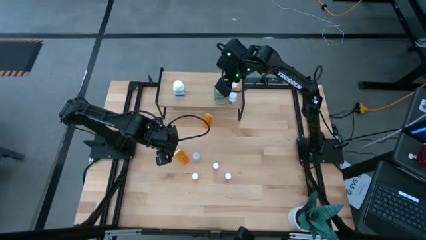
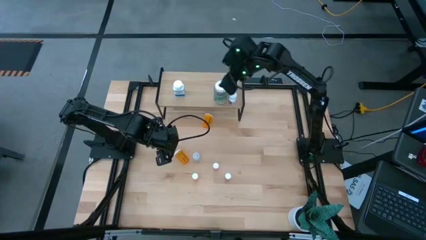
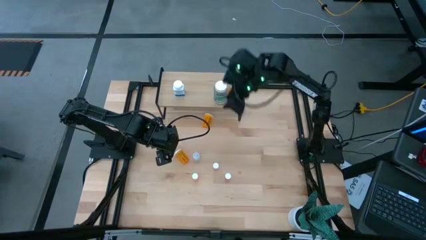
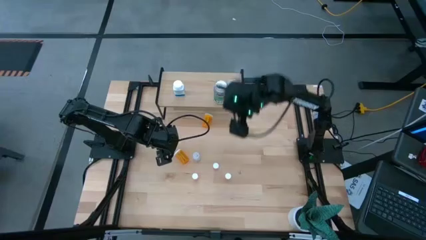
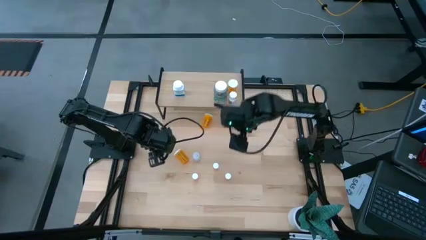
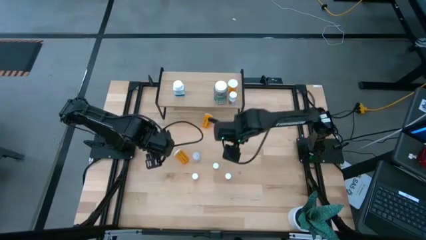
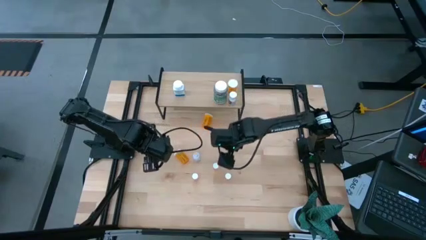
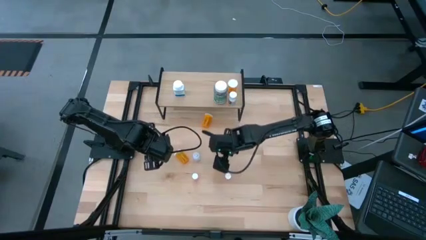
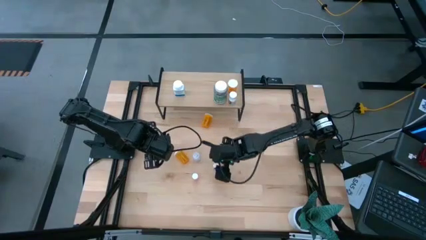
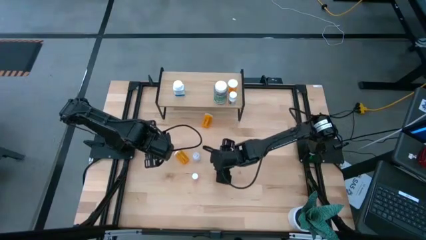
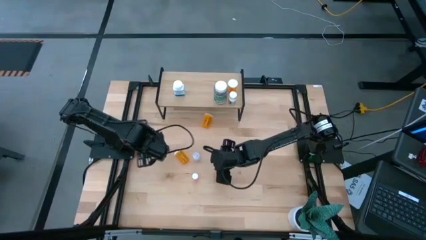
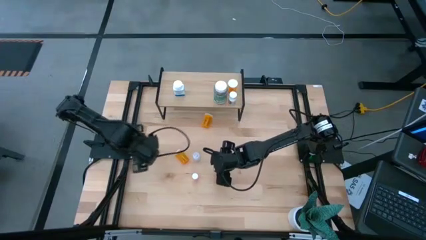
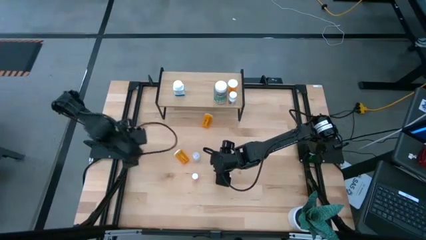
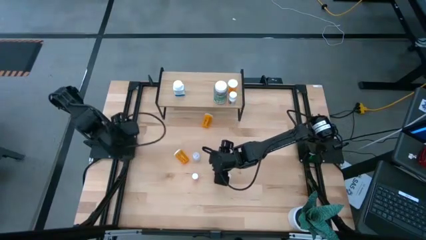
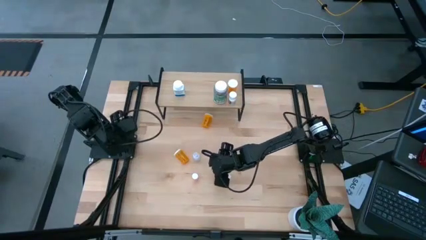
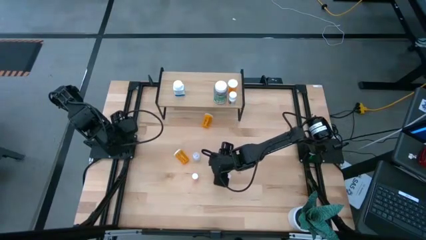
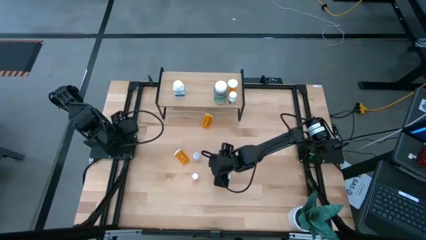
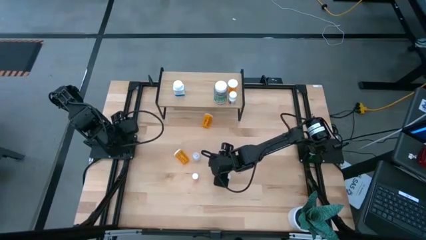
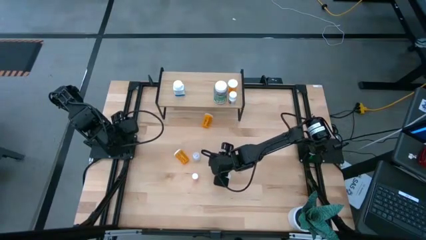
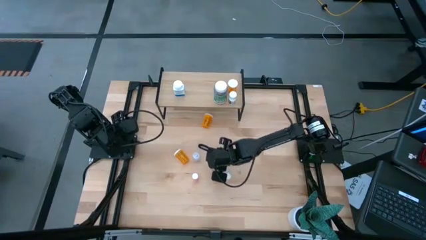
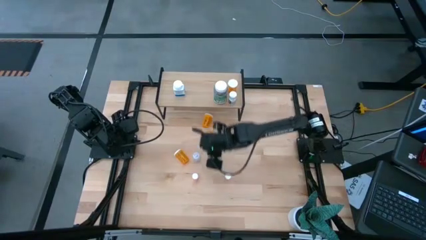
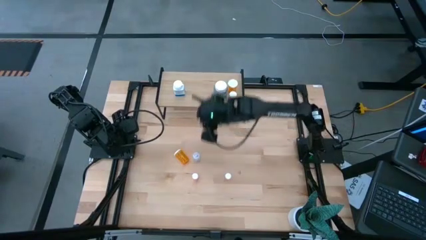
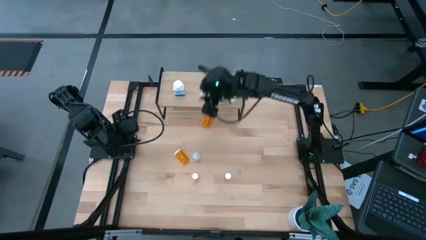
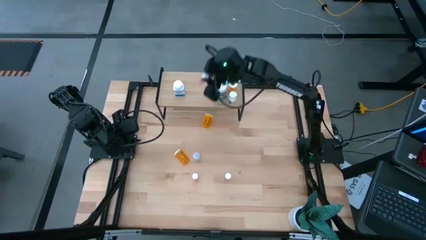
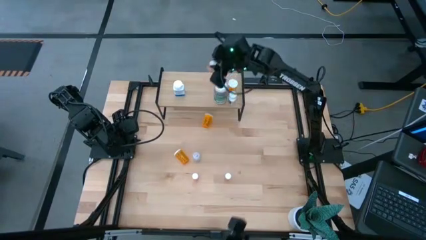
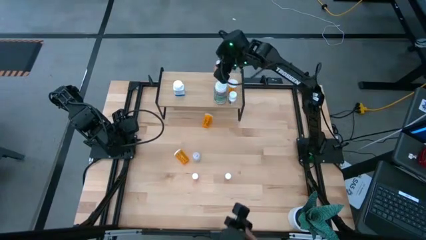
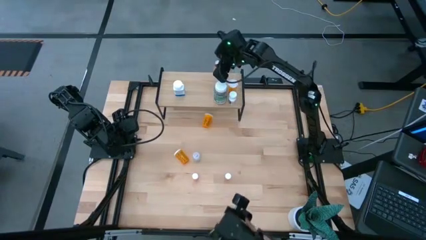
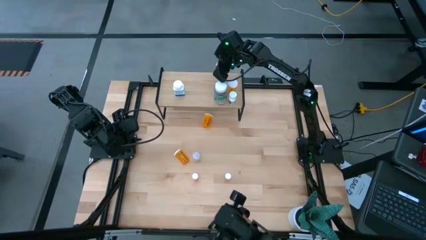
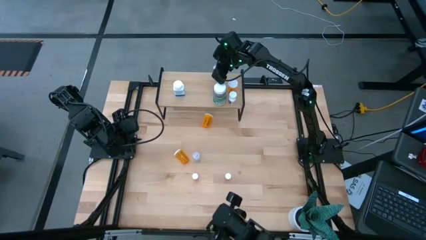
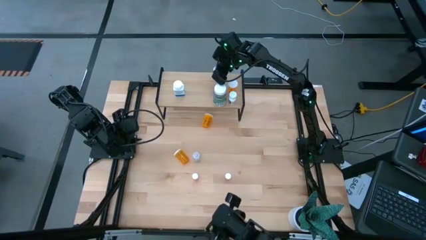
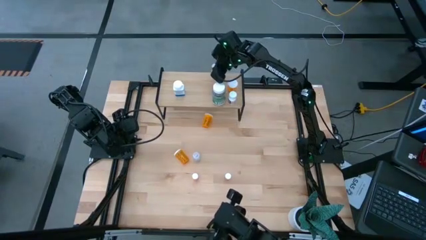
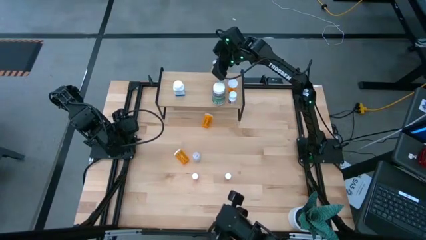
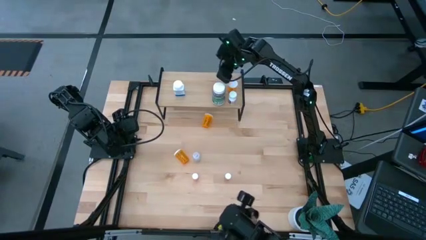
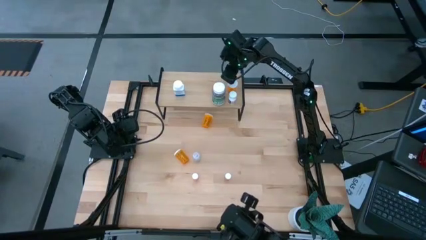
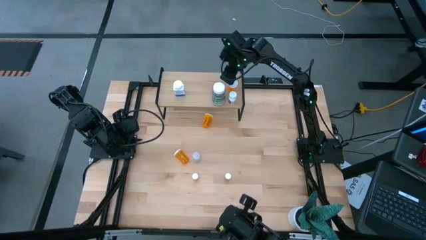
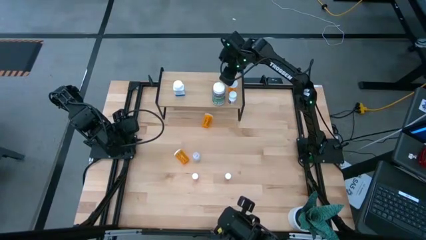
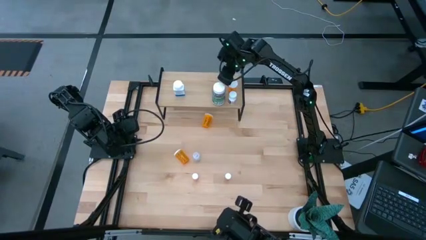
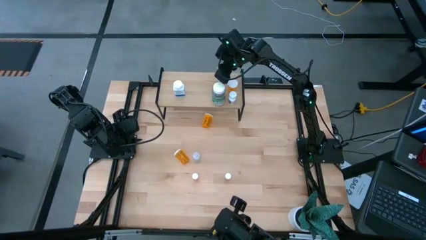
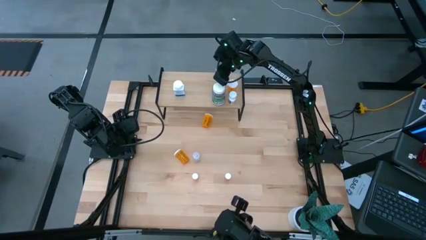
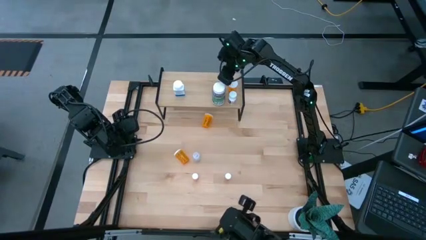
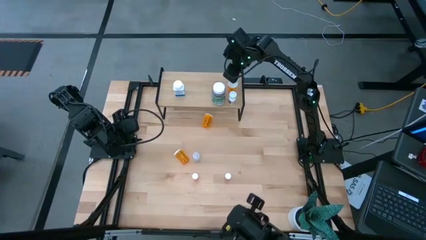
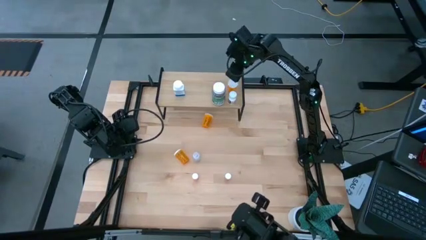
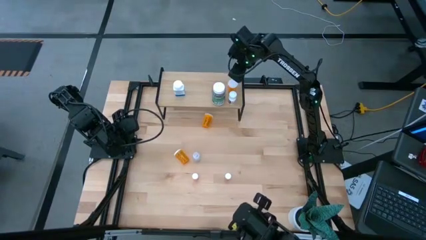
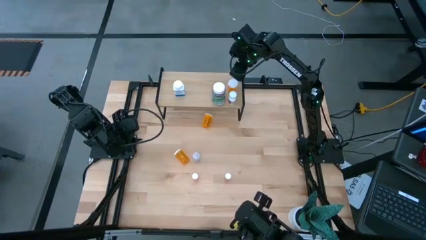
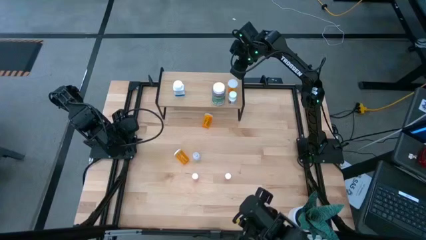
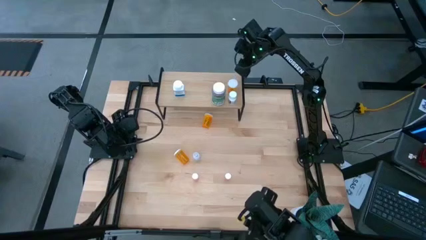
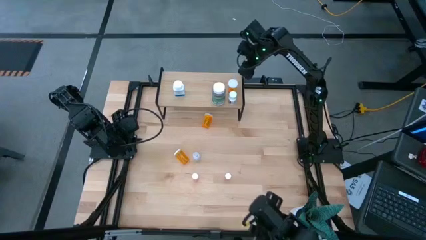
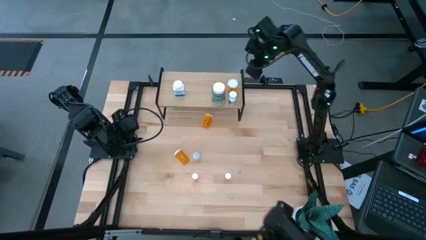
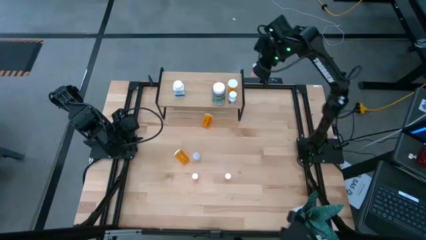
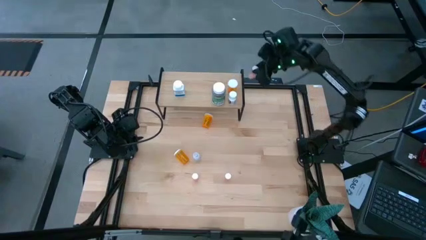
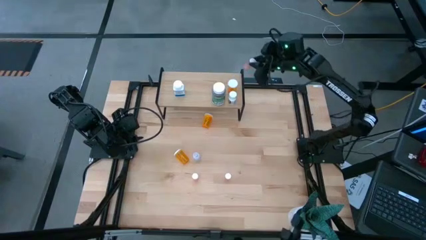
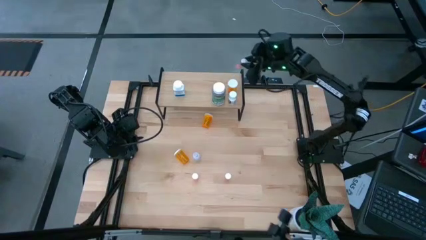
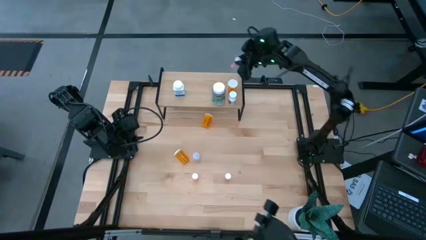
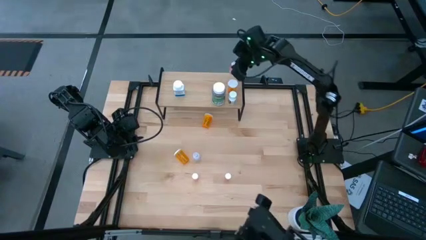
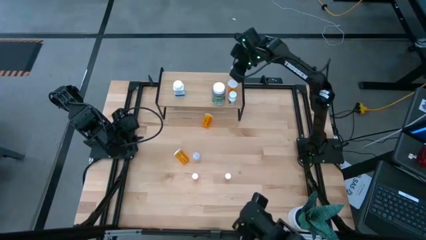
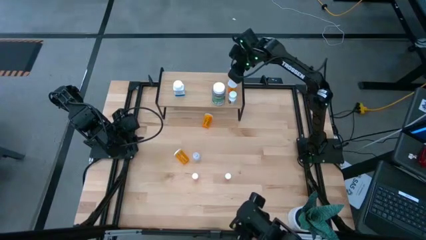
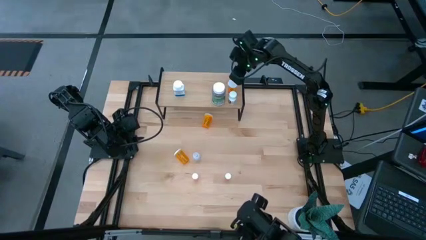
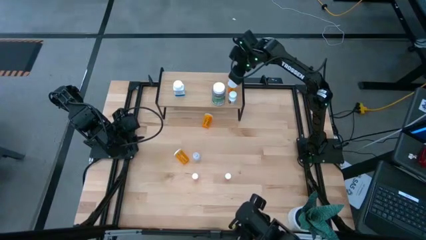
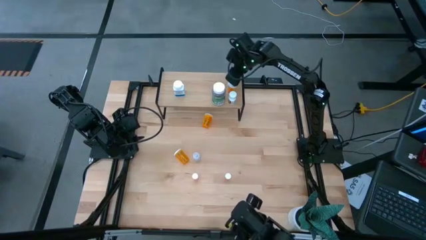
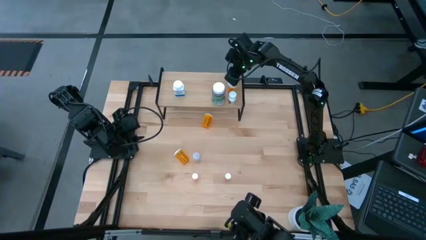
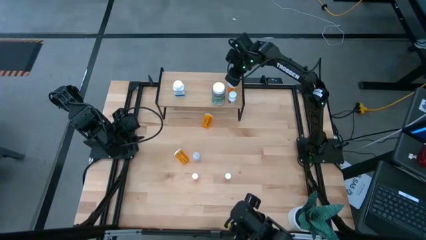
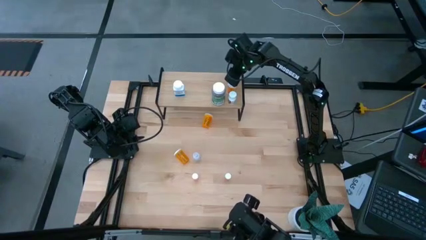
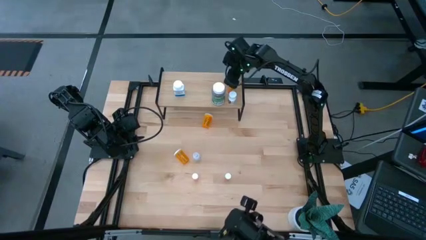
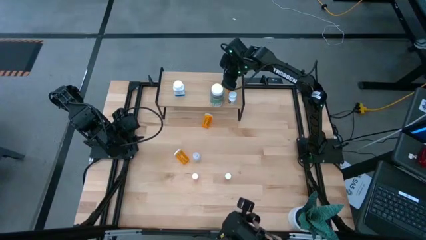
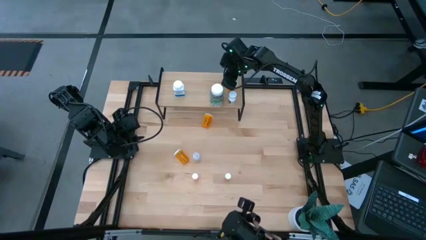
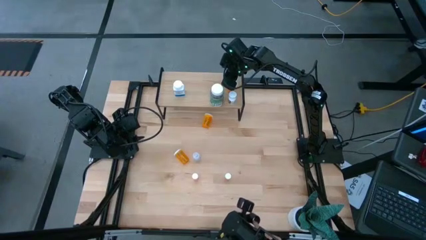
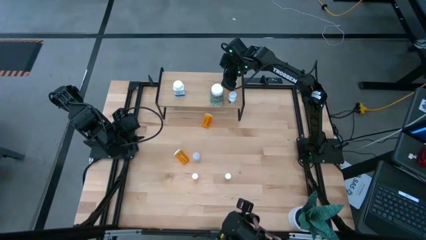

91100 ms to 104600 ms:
Task: Pick and place medicine bottles onto shelf by color
Put the middle pink pill bottle on the shelf

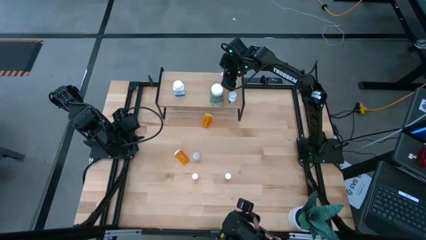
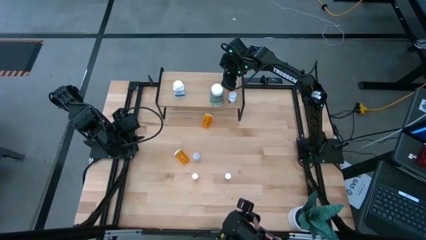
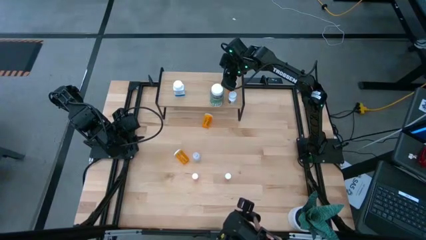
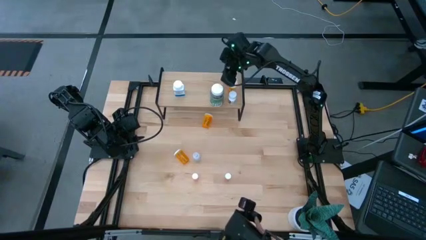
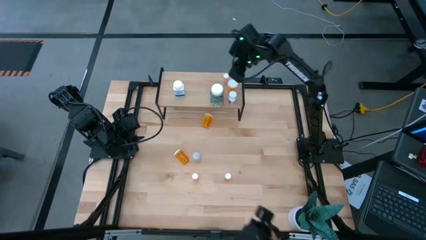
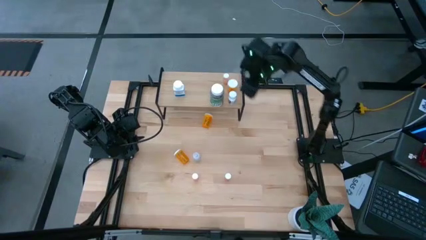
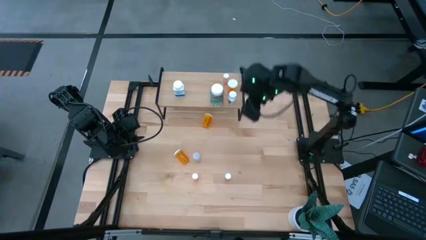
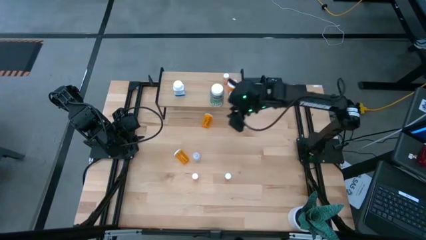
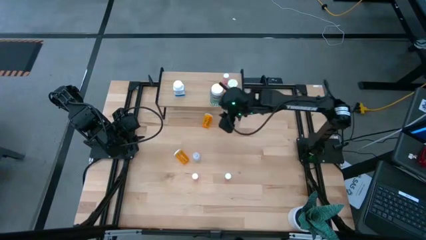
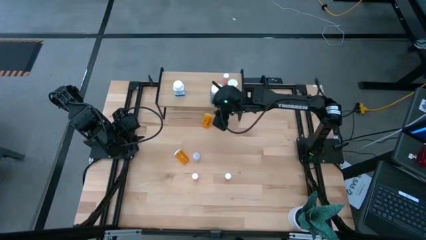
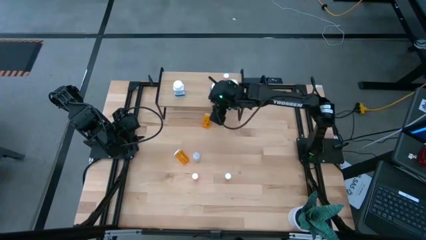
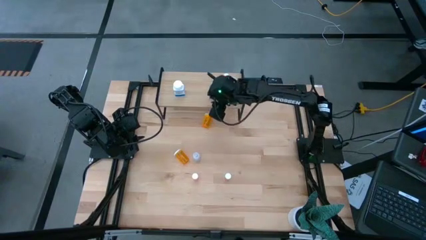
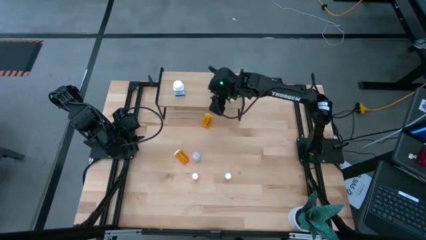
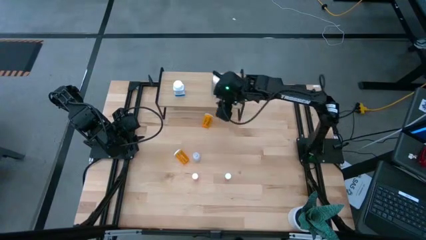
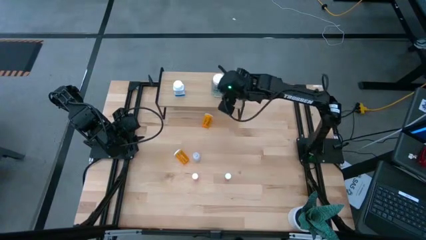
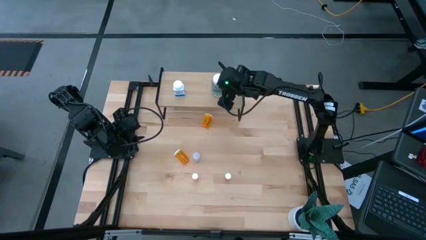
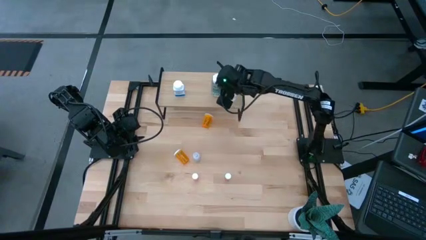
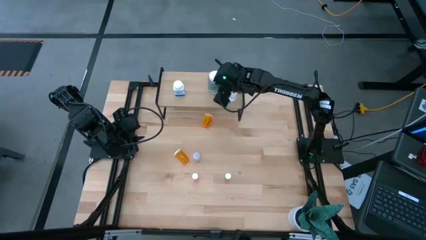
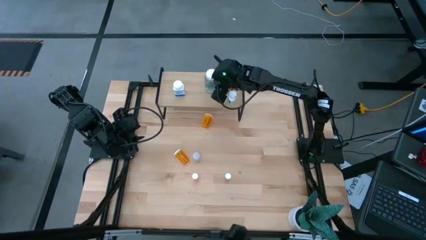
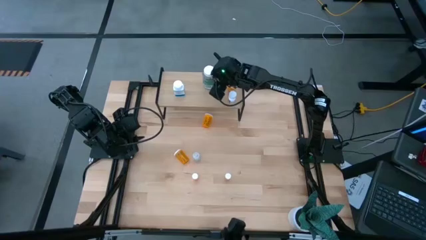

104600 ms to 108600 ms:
Adjust the green pill bottle on the shelf
